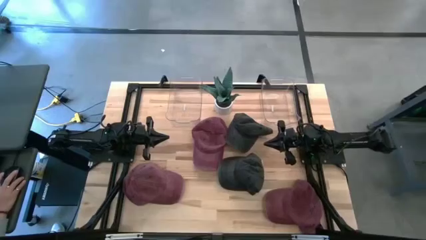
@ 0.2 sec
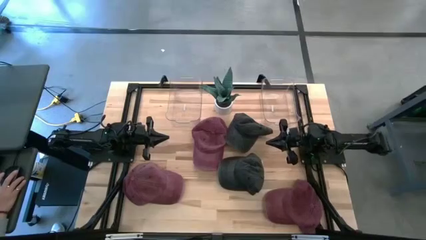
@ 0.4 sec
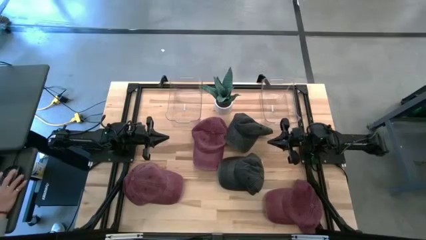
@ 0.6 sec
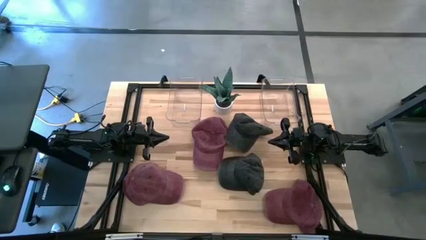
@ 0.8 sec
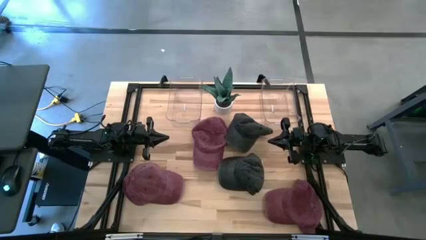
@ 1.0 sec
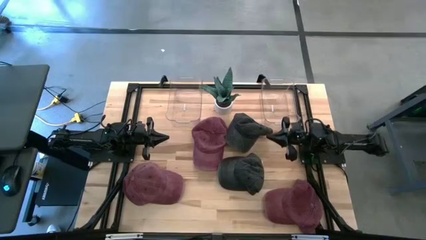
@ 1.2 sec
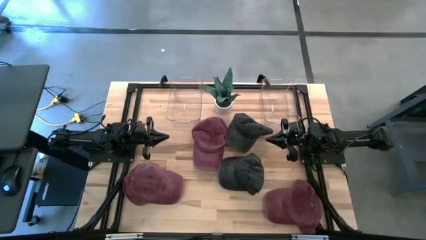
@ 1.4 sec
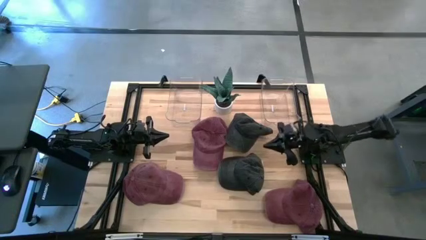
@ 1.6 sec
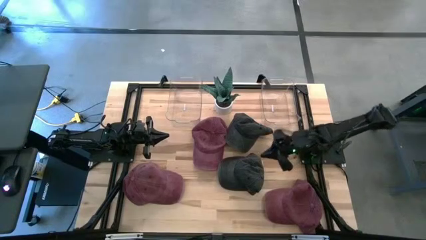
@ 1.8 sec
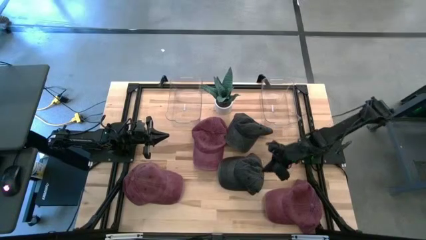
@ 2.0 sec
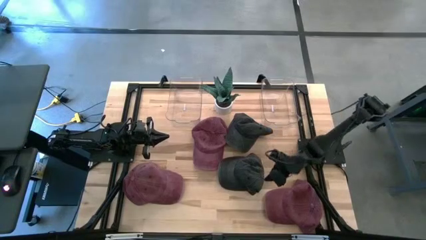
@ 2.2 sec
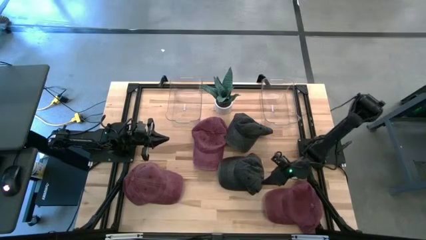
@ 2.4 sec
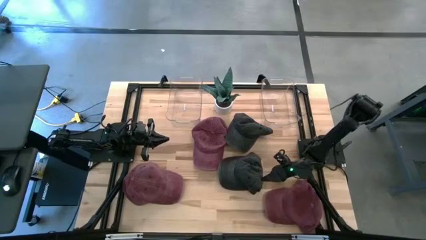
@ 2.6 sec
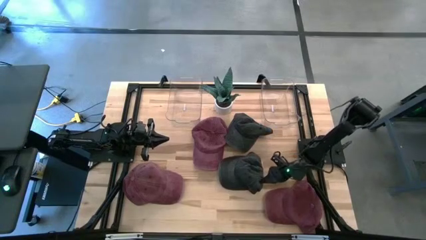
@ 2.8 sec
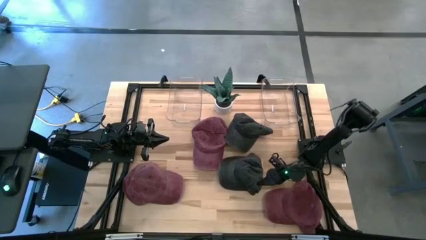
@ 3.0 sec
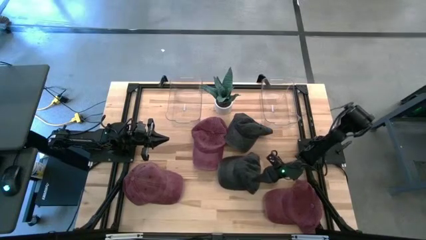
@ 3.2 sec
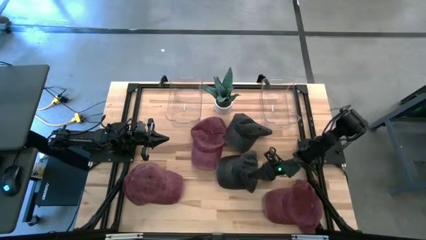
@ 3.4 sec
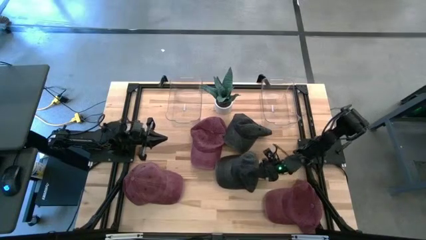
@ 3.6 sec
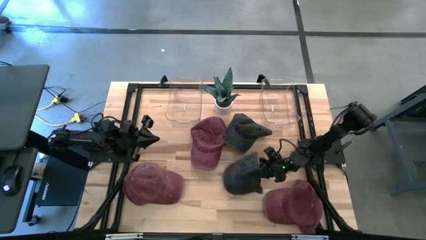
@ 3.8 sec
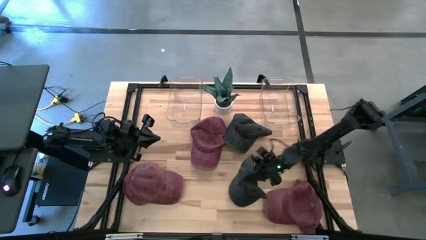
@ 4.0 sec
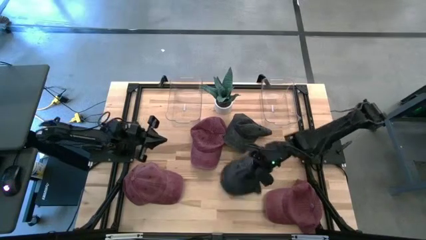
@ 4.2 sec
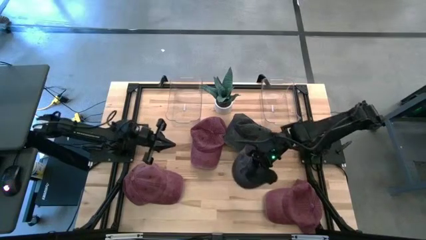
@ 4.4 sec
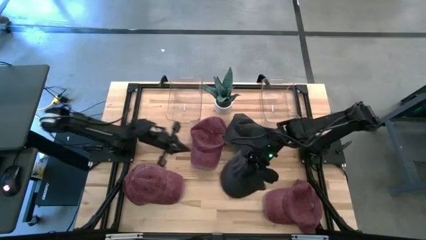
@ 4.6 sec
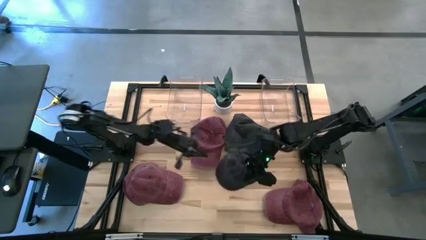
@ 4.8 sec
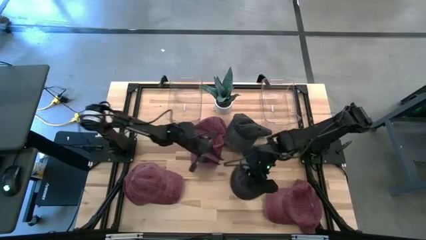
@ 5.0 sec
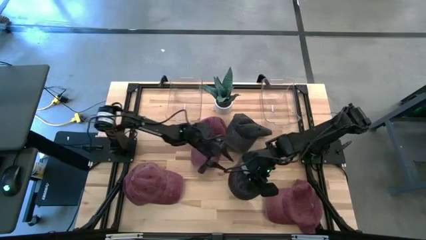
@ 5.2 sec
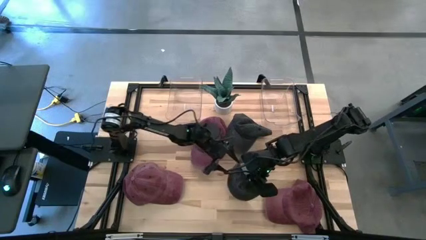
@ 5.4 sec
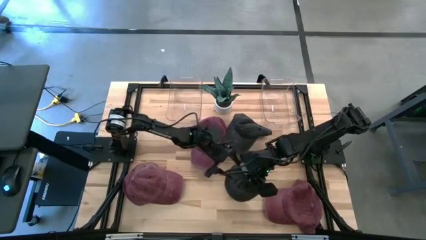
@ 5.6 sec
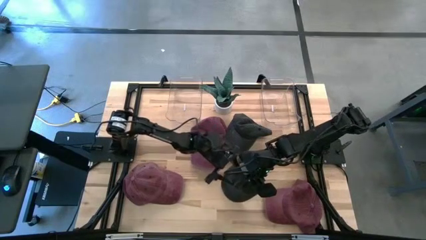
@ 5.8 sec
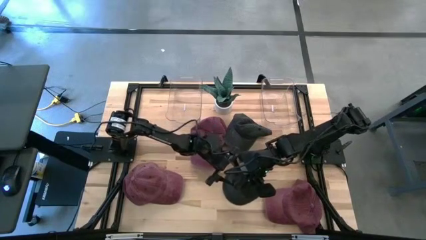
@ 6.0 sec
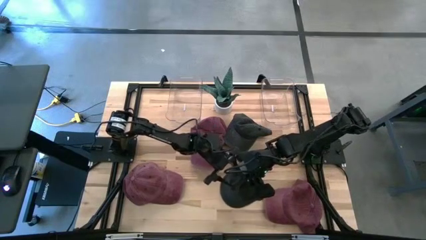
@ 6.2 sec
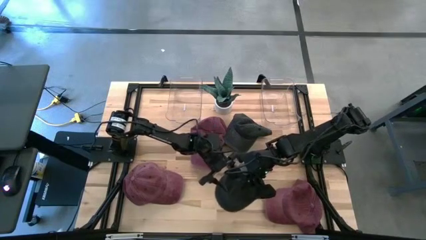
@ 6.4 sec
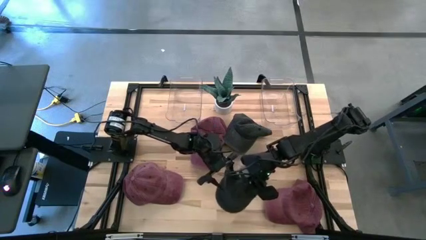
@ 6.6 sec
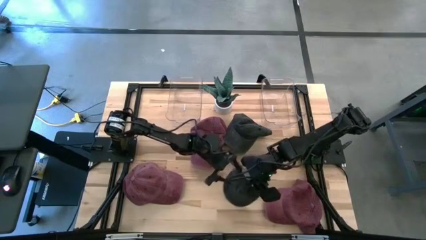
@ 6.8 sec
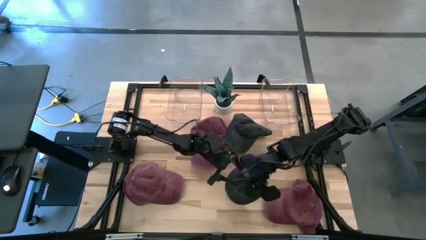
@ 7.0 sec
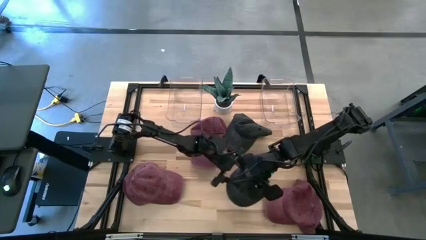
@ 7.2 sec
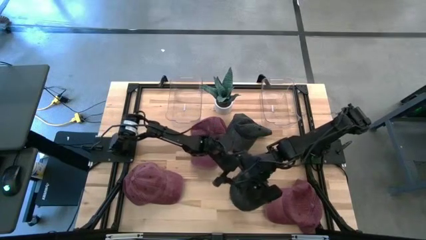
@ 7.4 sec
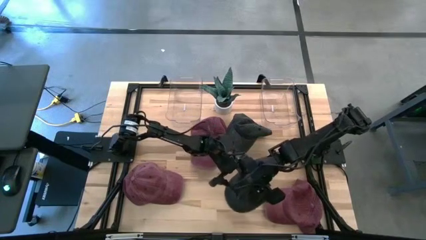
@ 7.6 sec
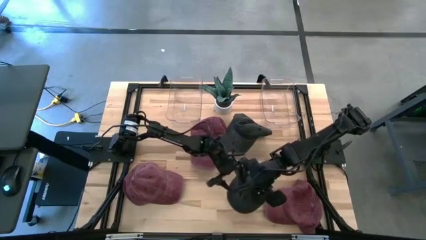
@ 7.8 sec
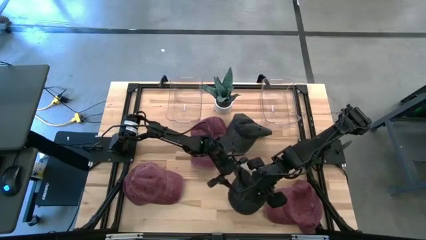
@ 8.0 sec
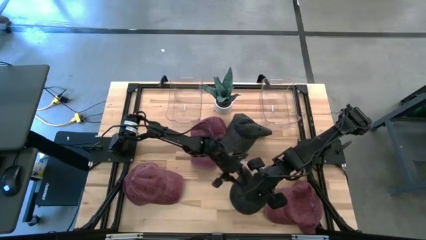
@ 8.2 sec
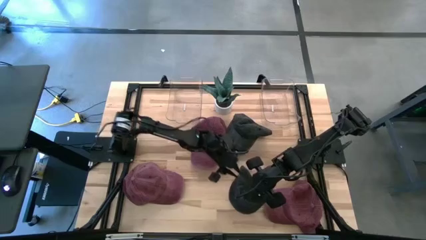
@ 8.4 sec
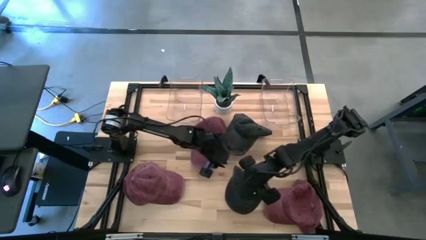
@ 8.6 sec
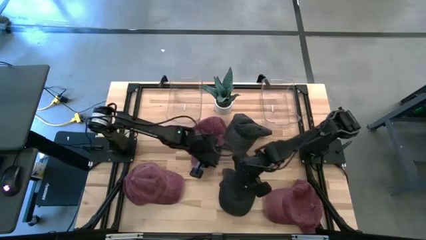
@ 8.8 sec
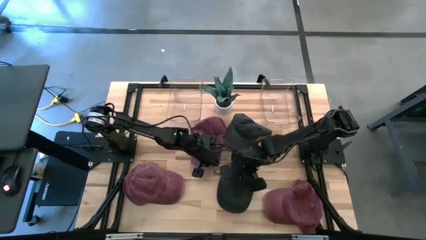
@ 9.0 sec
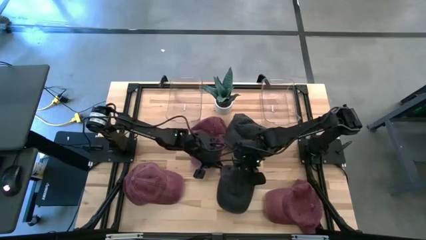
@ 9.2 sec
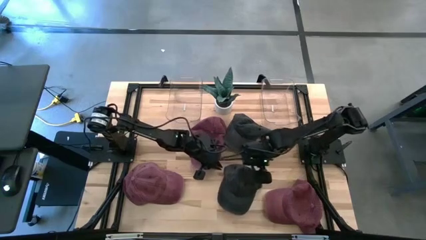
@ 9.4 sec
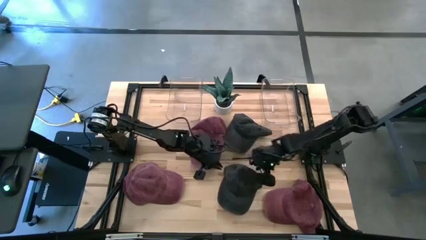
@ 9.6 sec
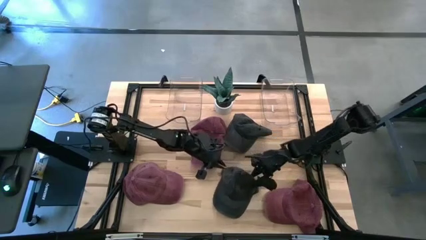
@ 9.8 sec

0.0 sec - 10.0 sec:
Task: Pick & Place hat
Put the bottom black cap into the left transparent bin
